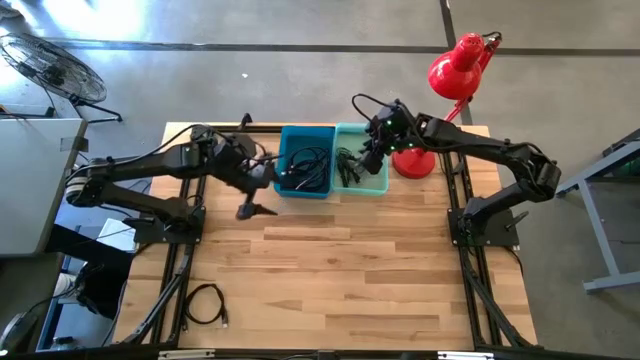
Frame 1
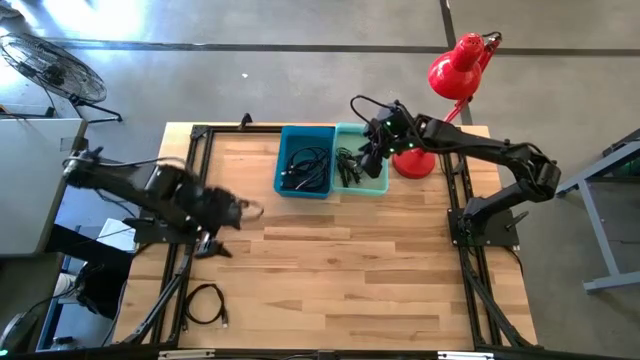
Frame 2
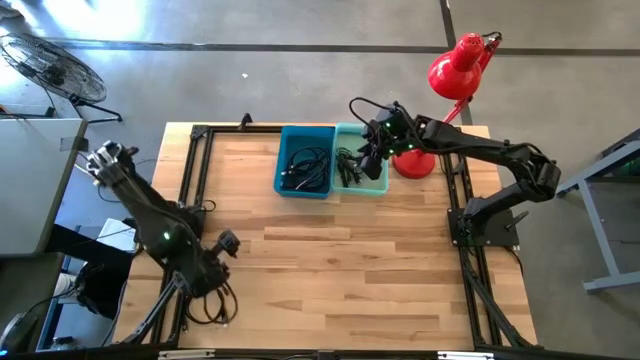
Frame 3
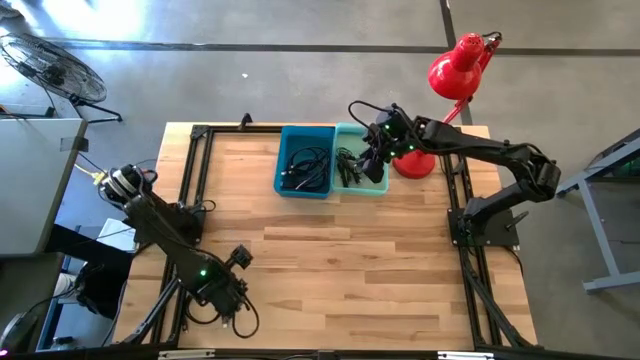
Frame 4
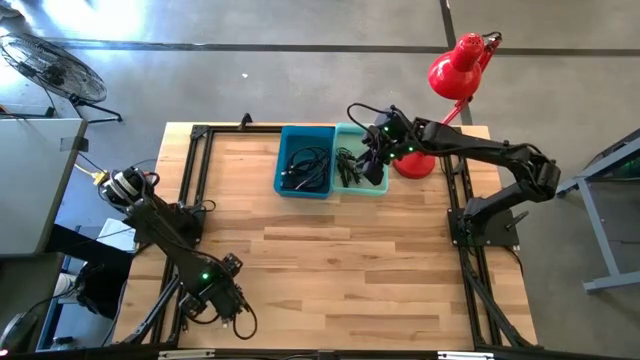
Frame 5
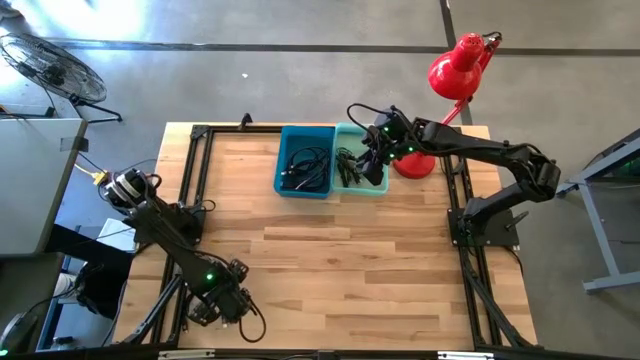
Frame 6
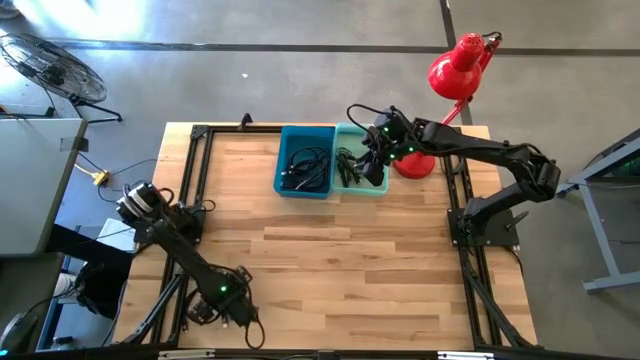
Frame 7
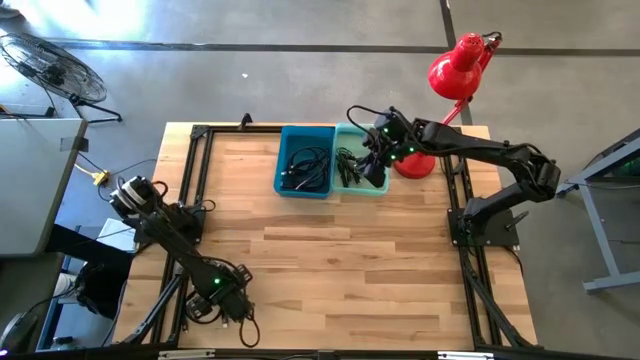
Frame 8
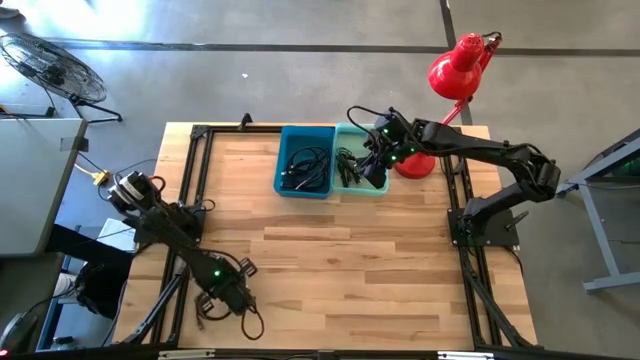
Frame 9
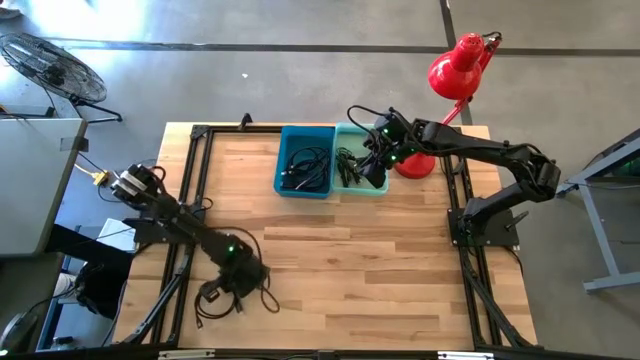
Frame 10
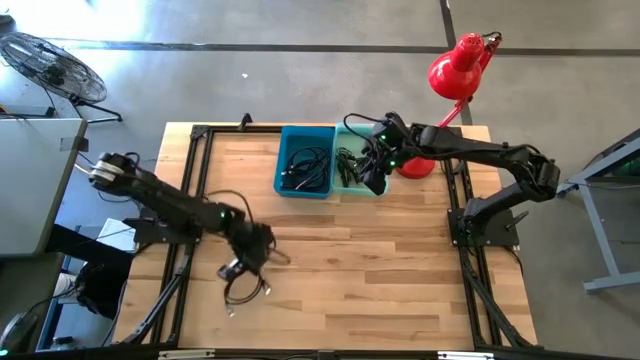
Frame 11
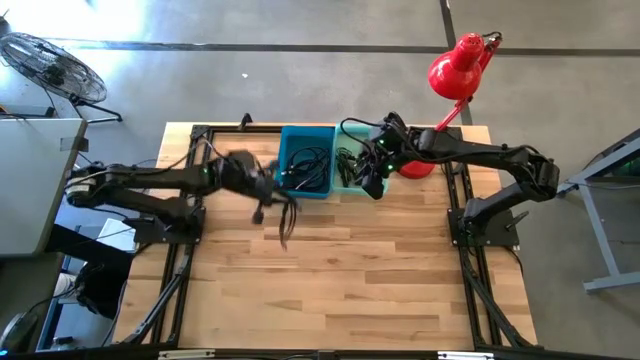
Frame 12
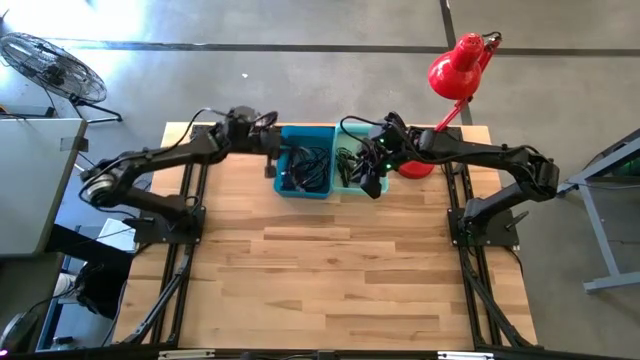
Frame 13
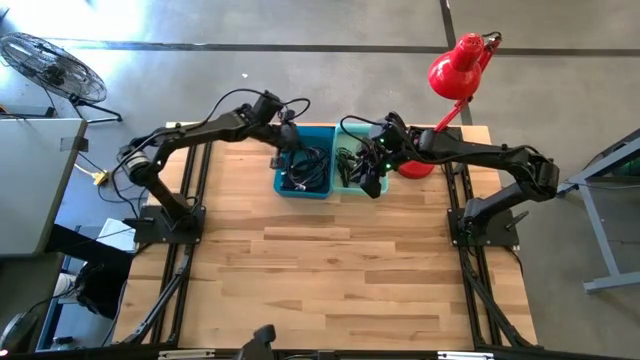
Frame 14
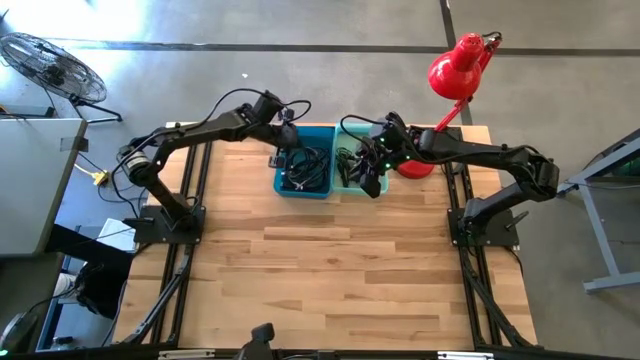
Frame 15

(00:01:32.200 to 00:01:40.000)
Task: Pick & Place USB Port
Put the black HDMI cable into the blue bin

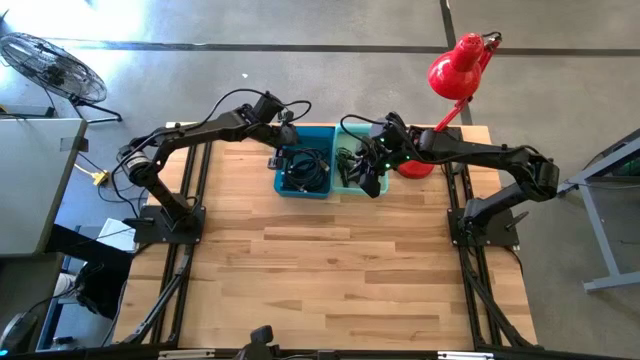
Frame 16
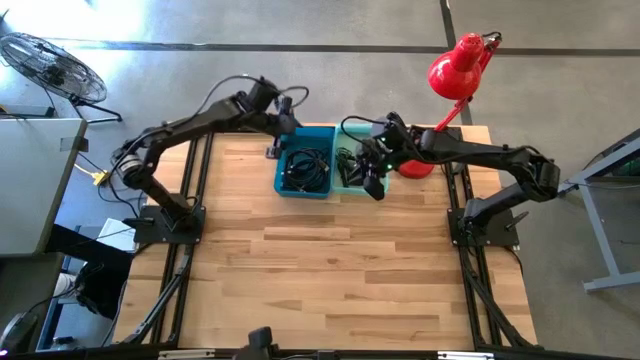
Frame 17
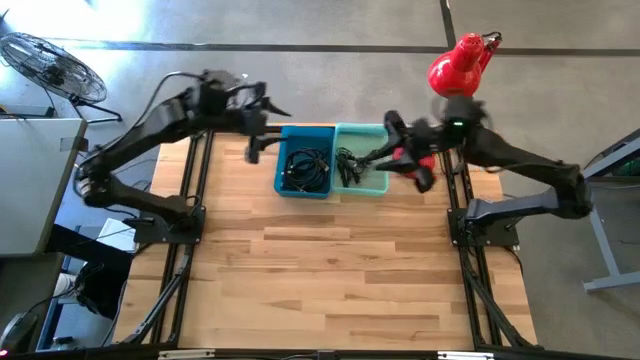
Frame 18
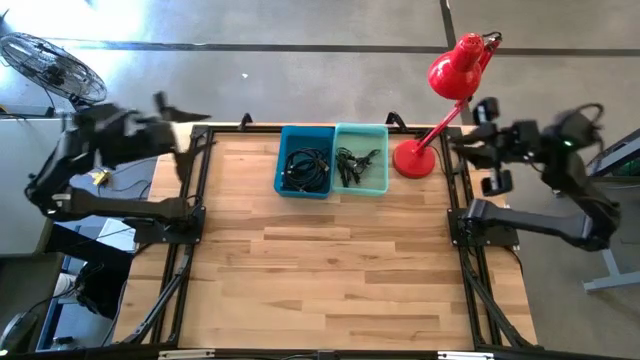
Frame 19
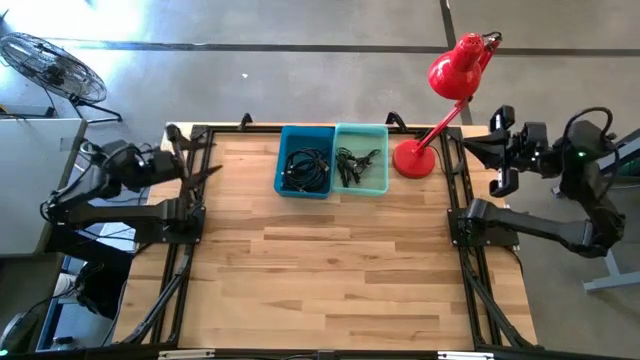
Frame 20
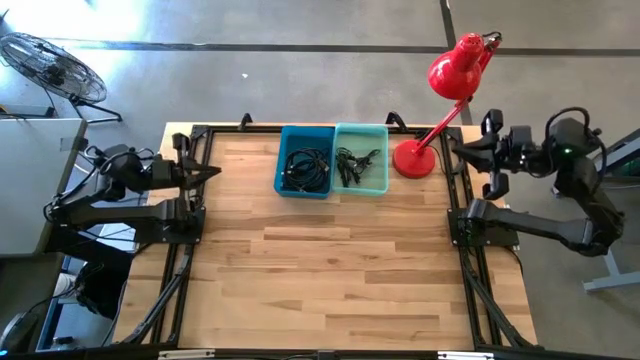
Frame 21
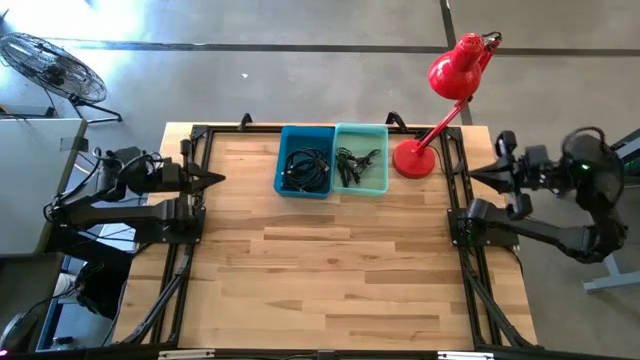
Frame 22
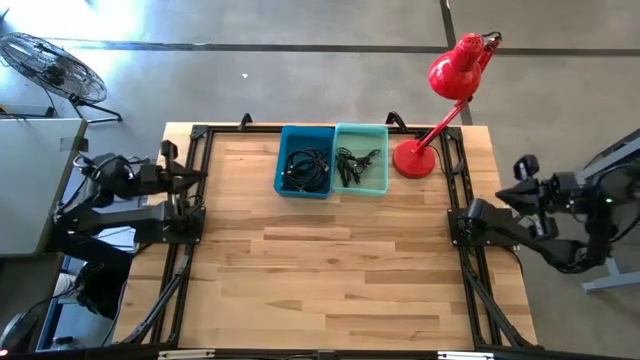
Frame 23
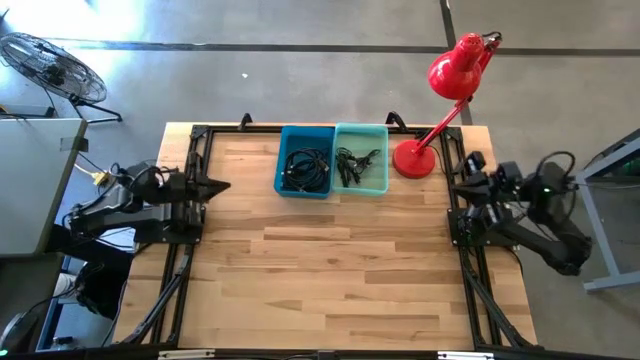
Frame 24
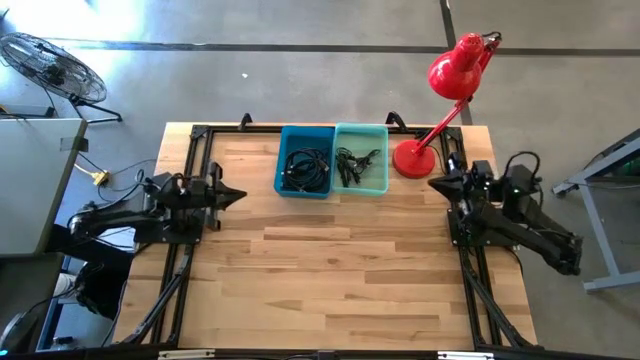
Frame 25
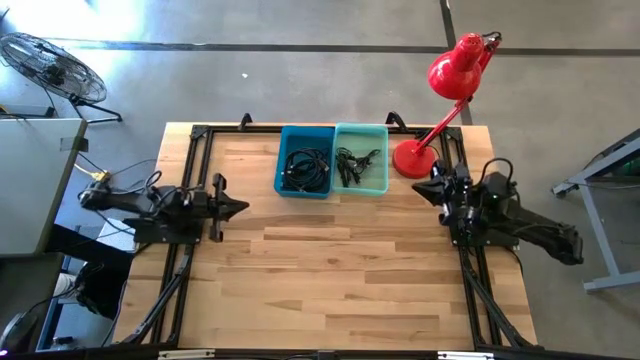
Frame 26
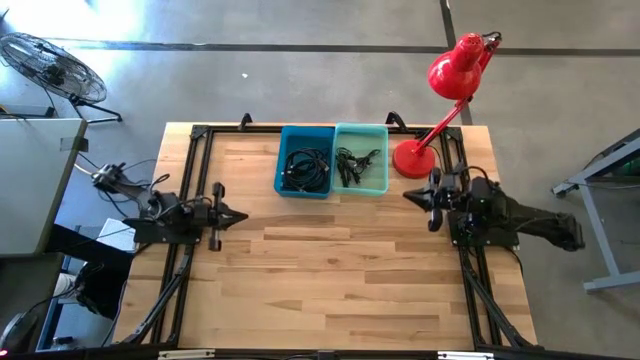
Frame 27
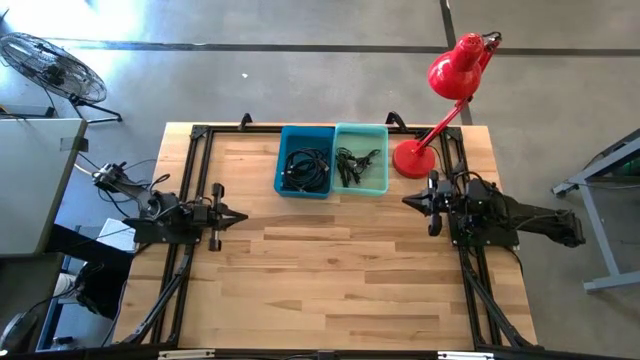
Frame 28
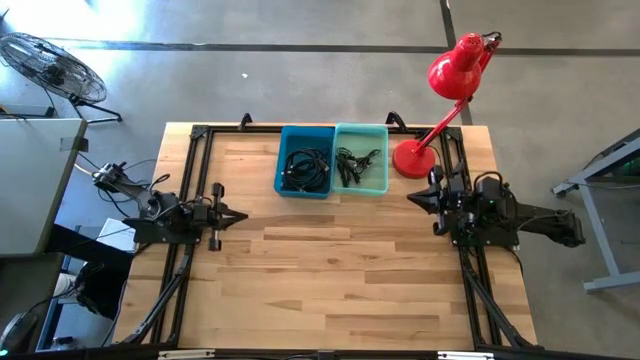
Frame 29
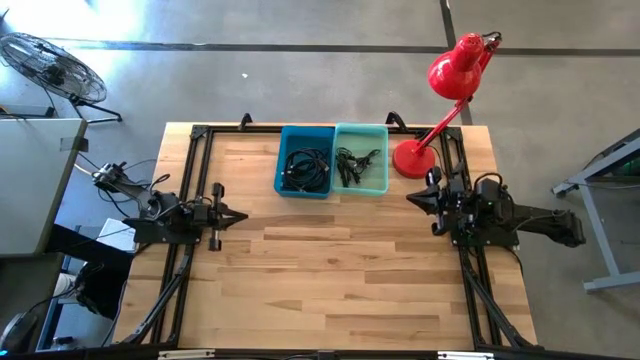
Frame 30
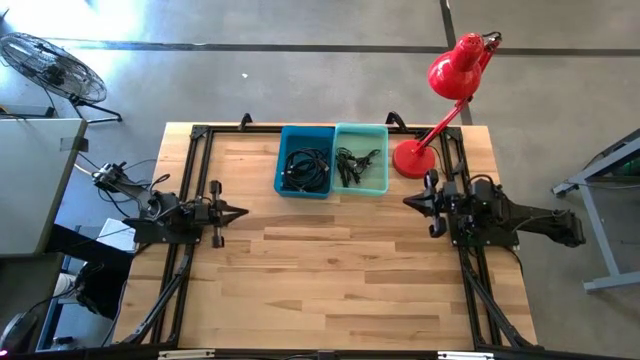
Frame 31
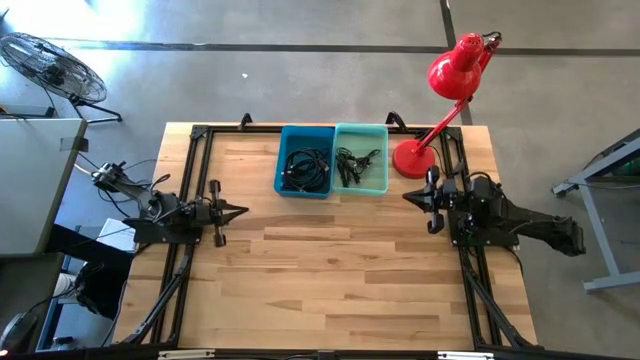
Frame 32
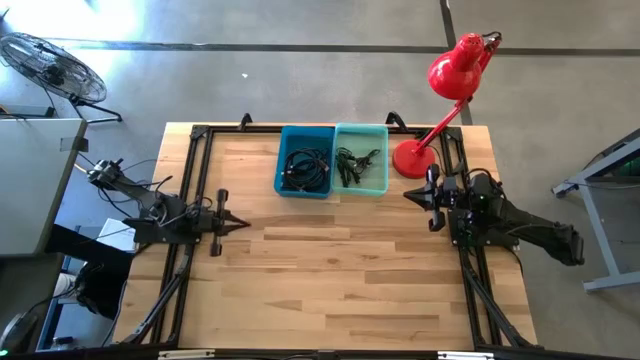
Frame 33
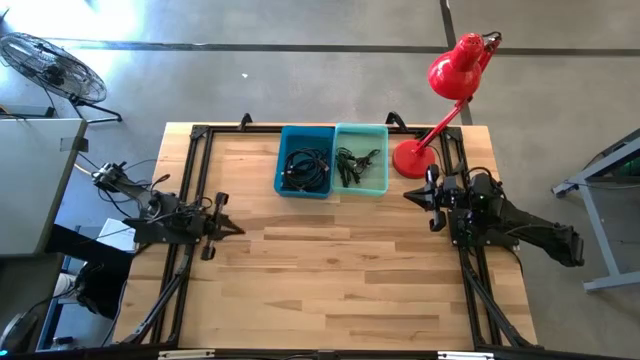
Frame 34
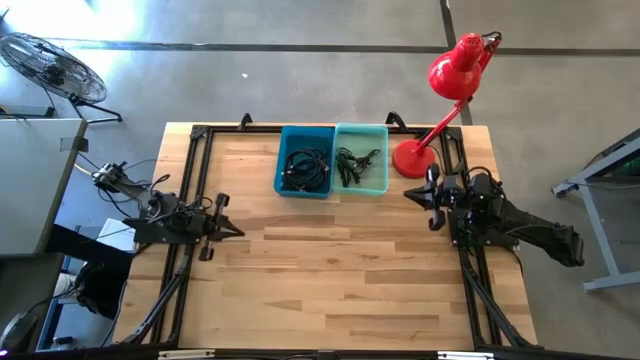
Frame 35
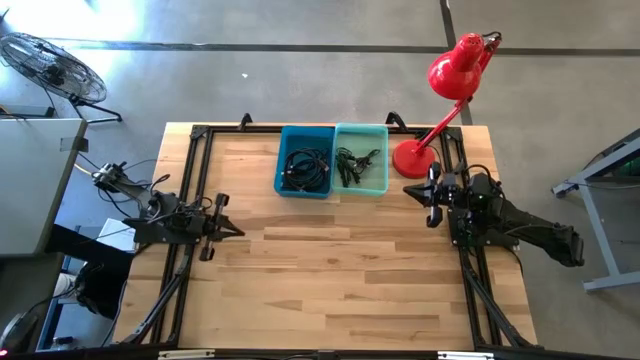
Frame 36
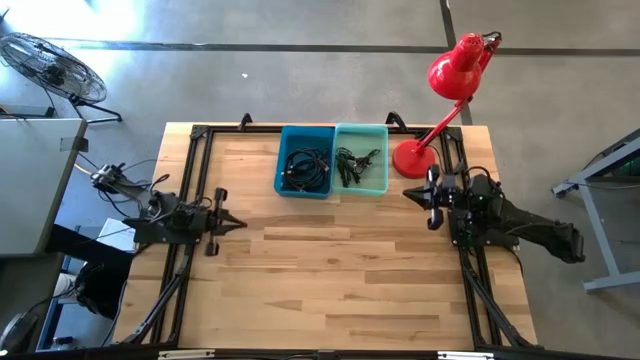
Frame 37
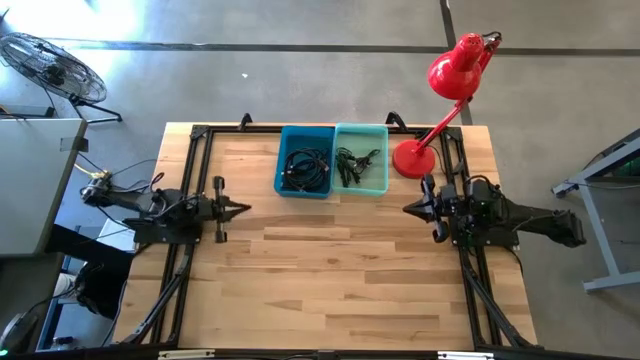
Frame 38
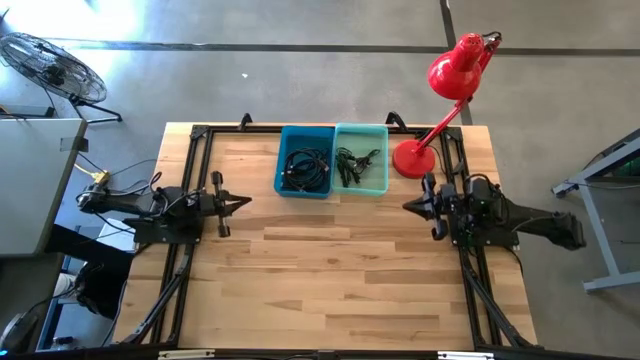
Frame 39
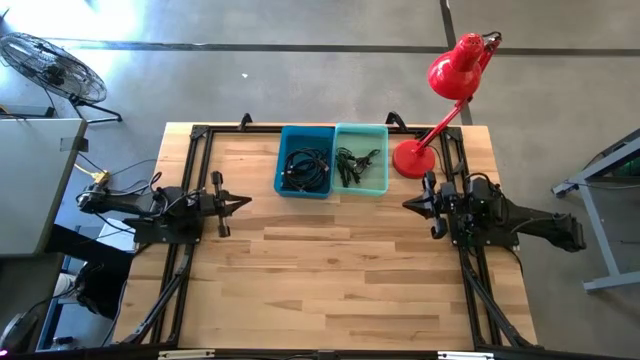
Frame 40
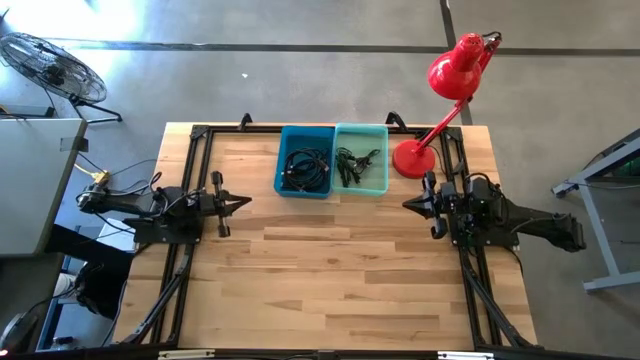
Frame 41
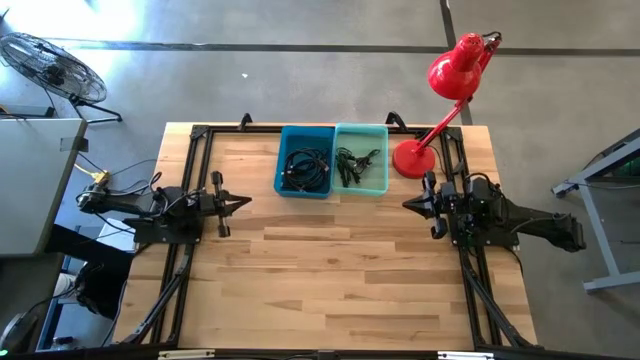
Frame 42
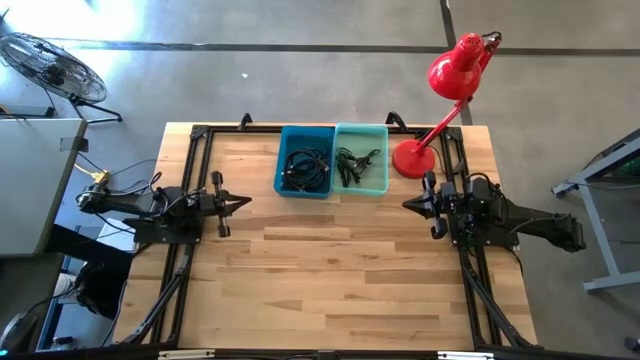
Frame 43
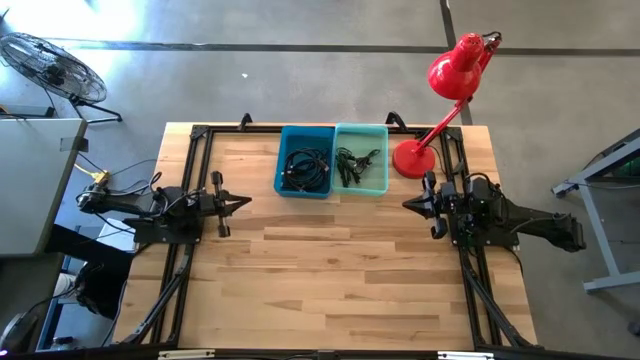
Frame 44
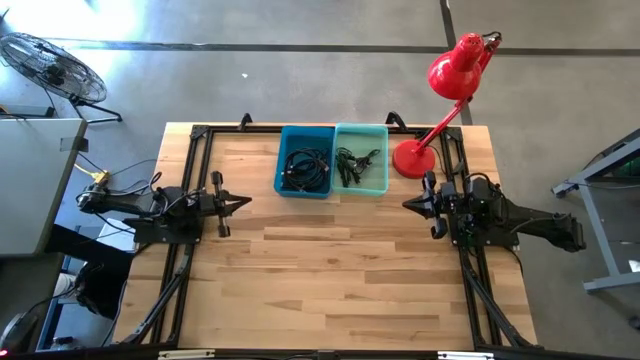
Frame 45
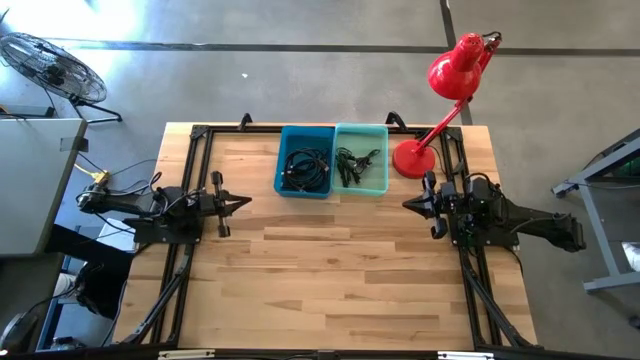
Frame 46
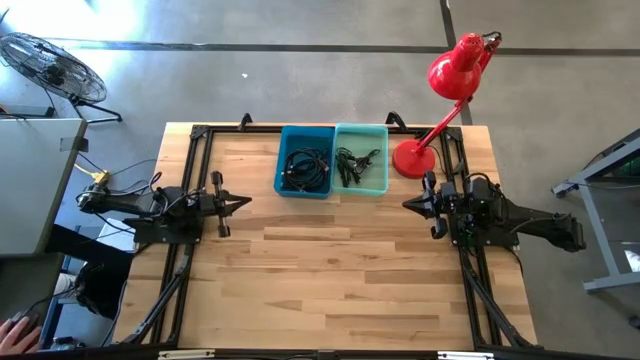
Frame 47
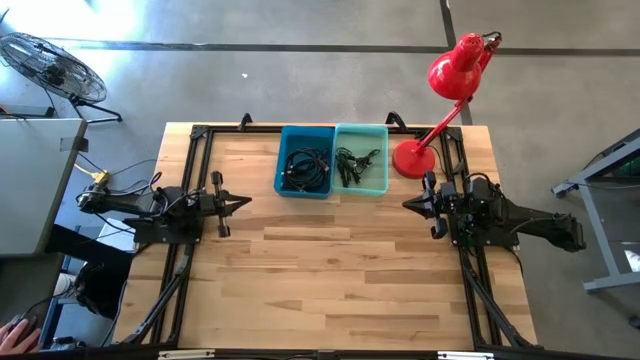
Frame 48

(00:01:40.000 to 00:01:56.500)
Return to Home Position
